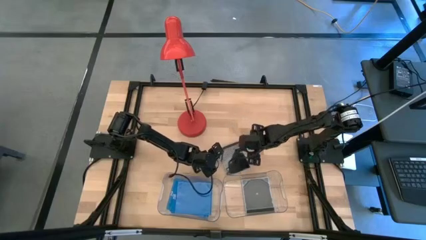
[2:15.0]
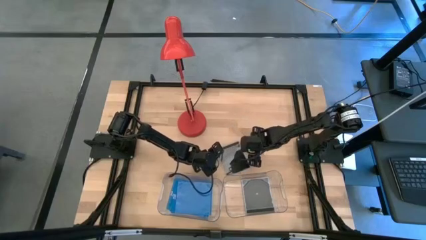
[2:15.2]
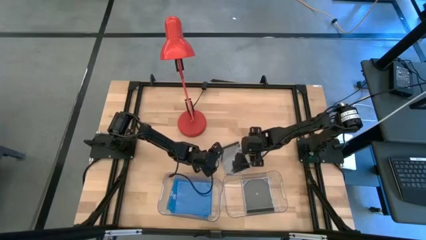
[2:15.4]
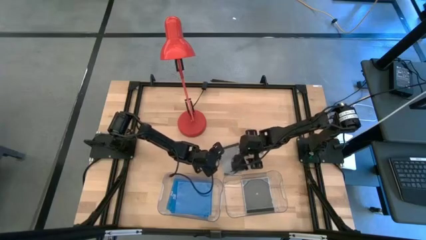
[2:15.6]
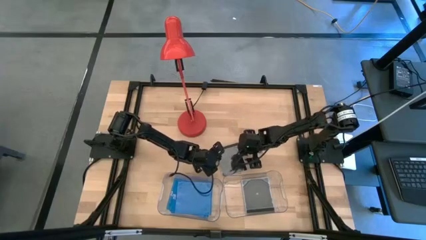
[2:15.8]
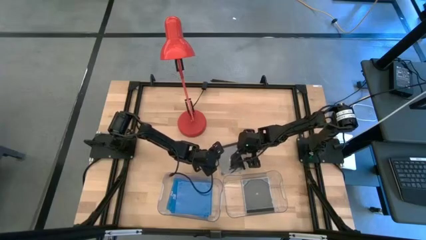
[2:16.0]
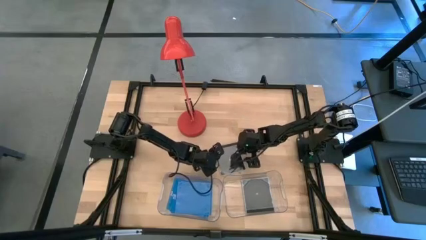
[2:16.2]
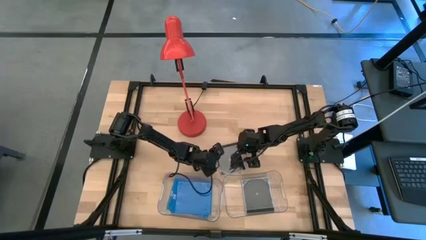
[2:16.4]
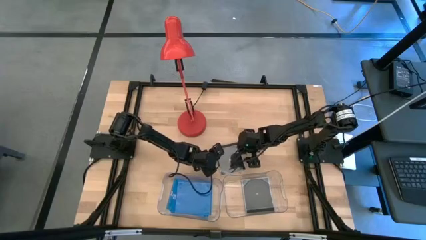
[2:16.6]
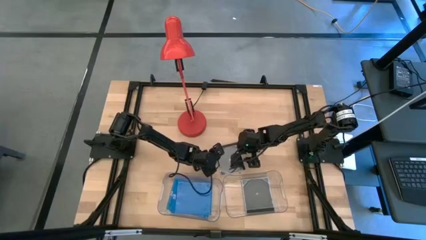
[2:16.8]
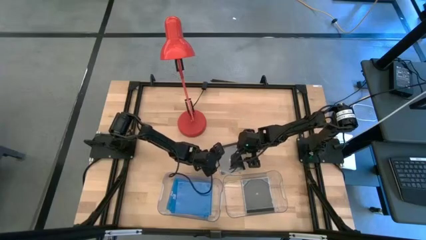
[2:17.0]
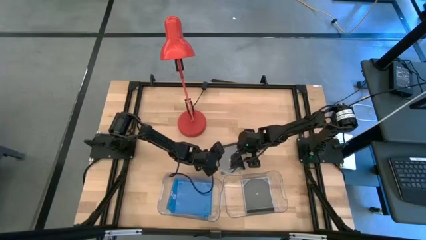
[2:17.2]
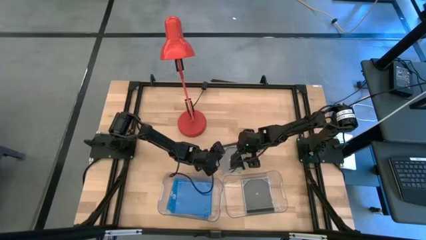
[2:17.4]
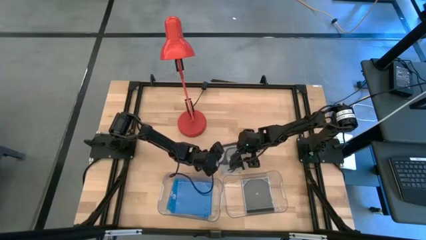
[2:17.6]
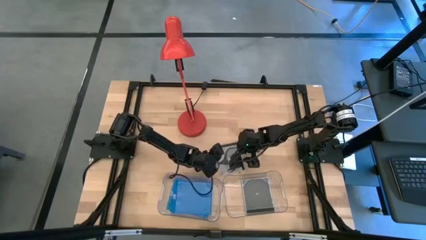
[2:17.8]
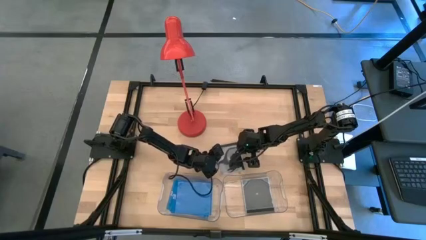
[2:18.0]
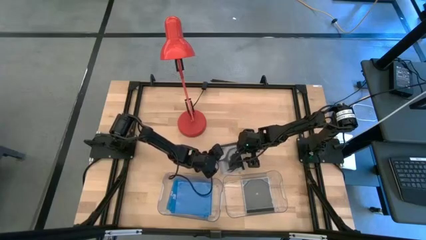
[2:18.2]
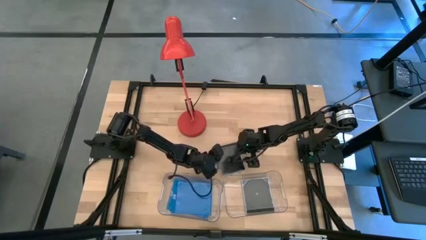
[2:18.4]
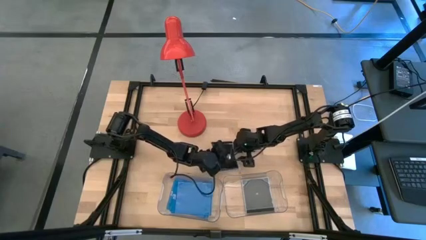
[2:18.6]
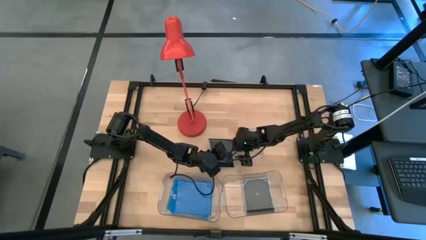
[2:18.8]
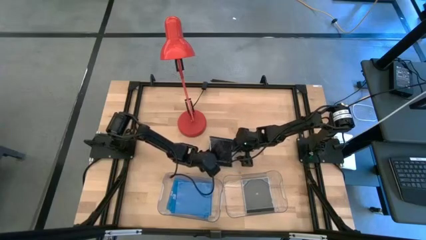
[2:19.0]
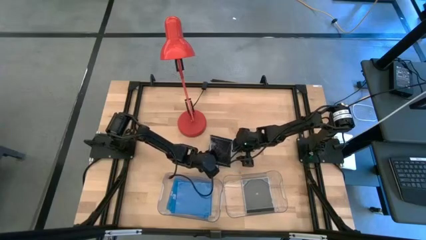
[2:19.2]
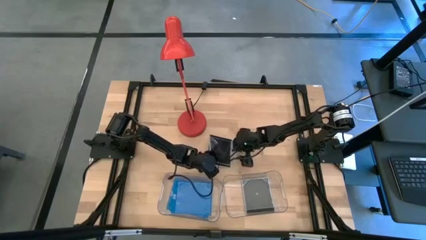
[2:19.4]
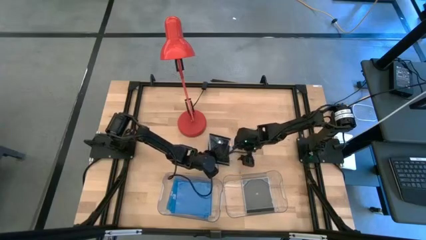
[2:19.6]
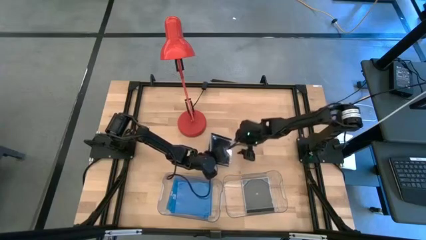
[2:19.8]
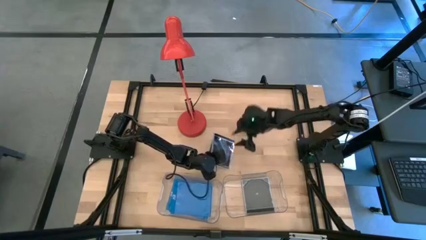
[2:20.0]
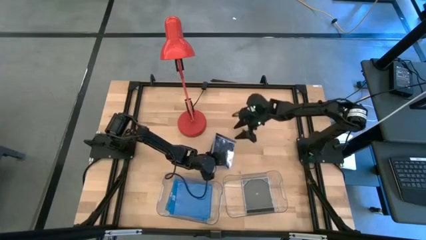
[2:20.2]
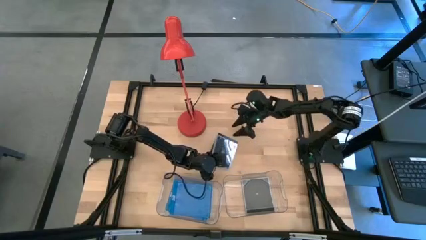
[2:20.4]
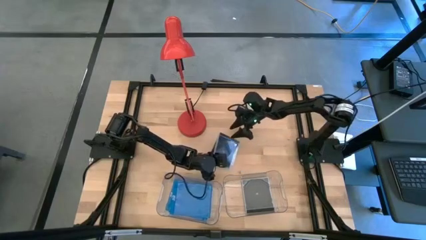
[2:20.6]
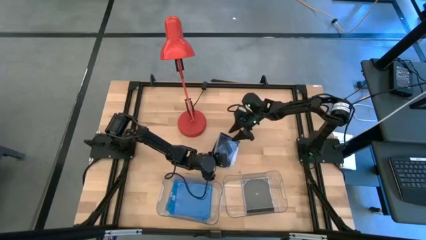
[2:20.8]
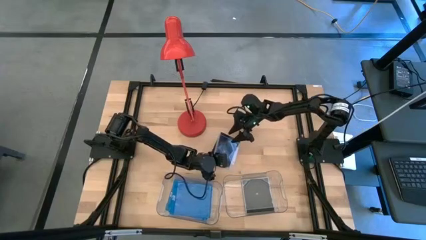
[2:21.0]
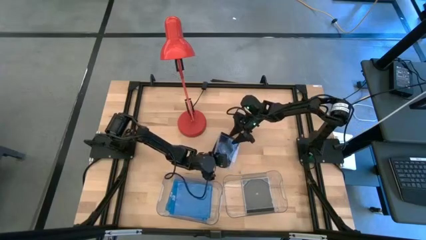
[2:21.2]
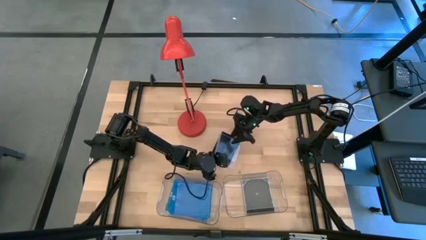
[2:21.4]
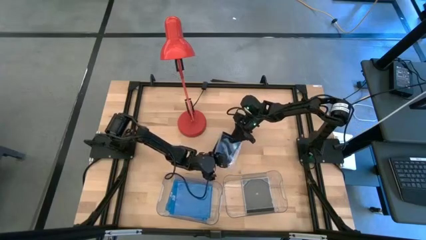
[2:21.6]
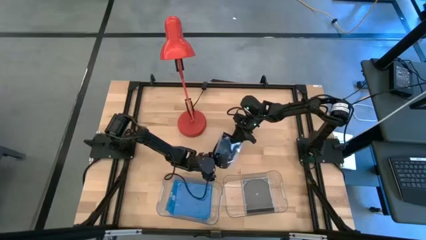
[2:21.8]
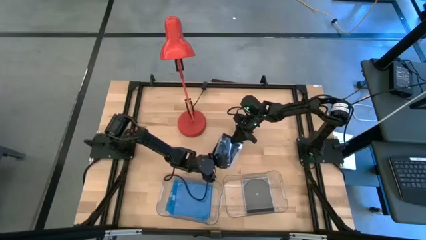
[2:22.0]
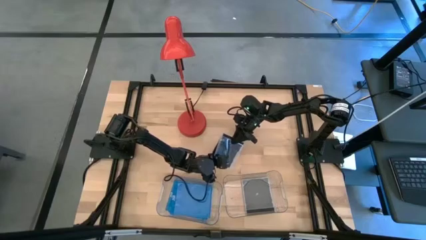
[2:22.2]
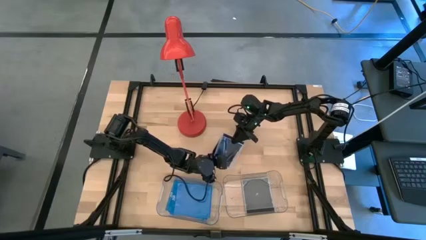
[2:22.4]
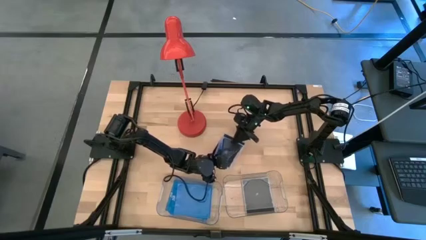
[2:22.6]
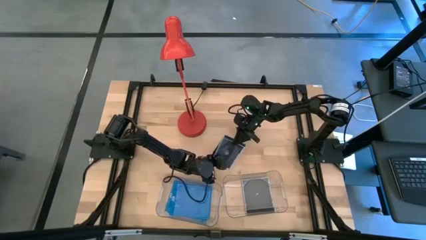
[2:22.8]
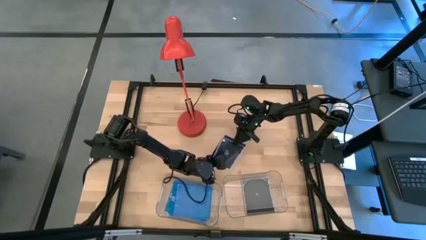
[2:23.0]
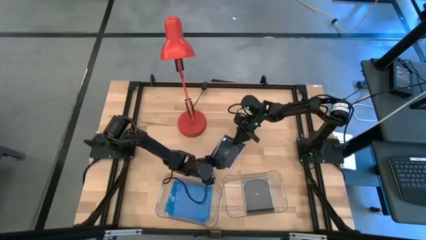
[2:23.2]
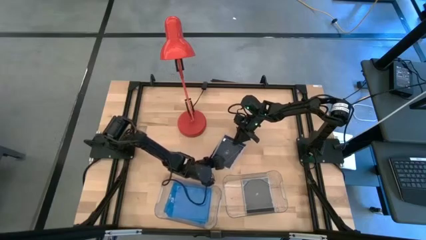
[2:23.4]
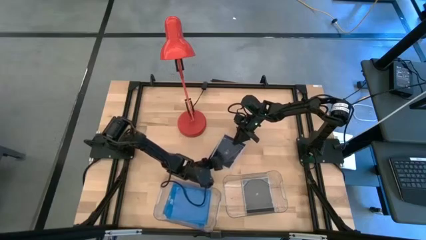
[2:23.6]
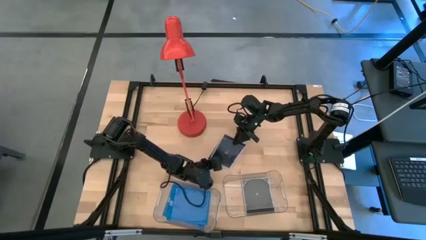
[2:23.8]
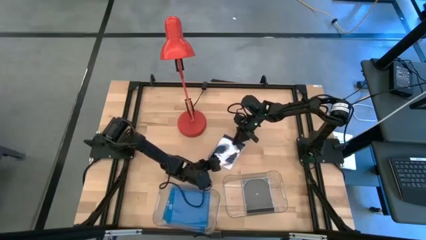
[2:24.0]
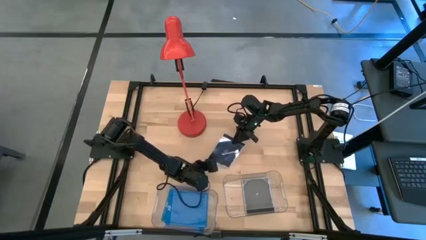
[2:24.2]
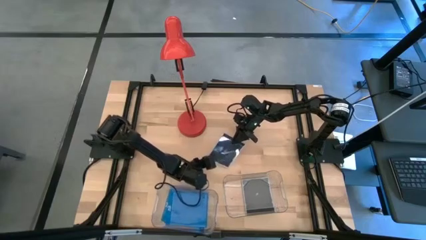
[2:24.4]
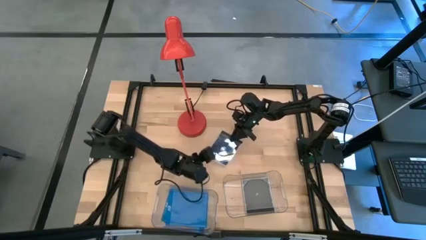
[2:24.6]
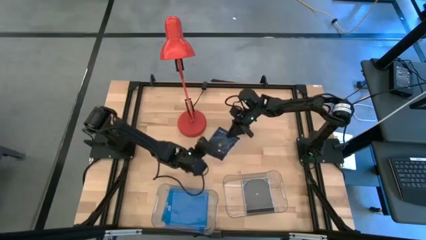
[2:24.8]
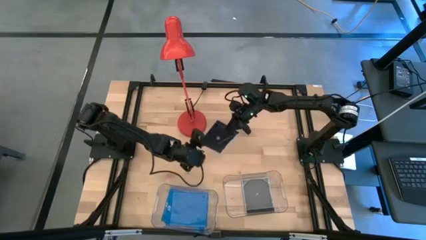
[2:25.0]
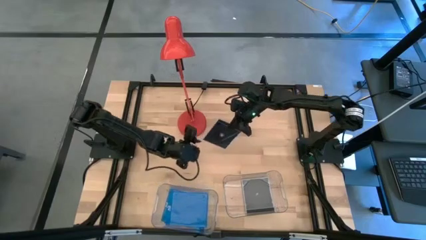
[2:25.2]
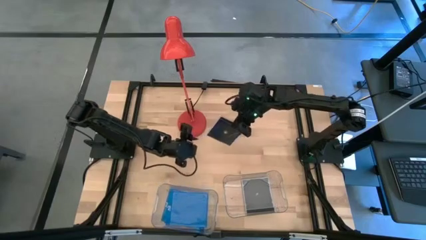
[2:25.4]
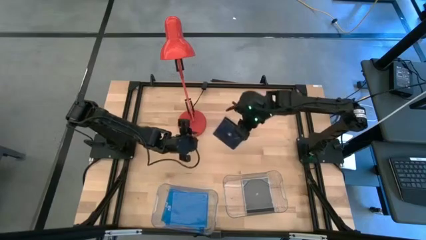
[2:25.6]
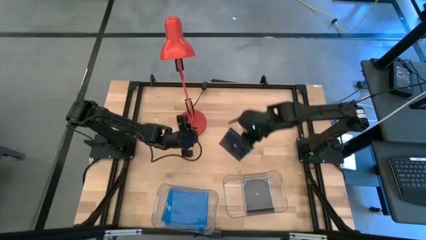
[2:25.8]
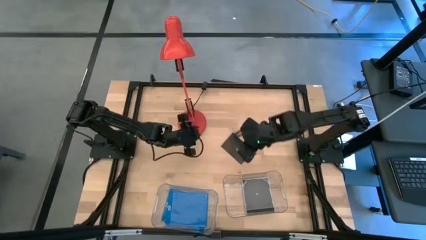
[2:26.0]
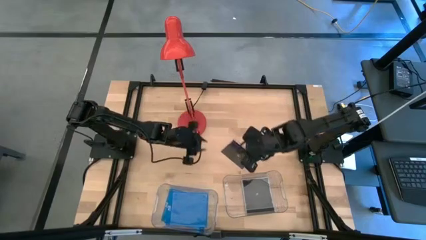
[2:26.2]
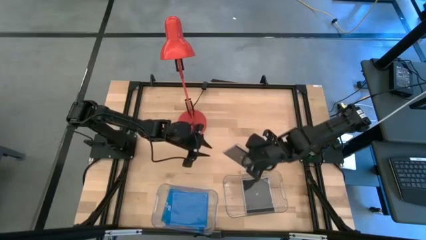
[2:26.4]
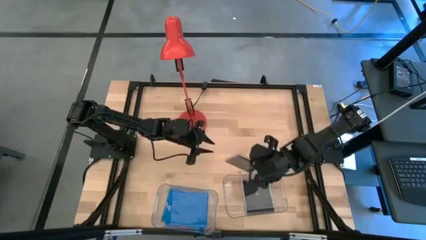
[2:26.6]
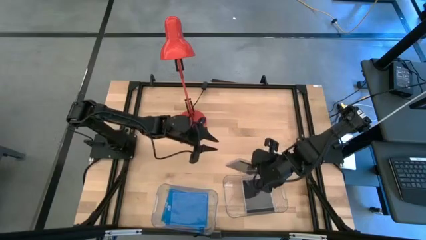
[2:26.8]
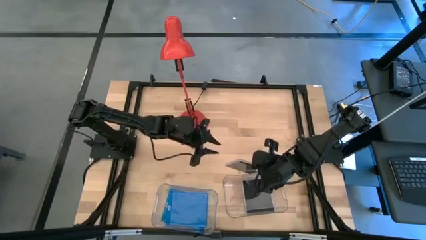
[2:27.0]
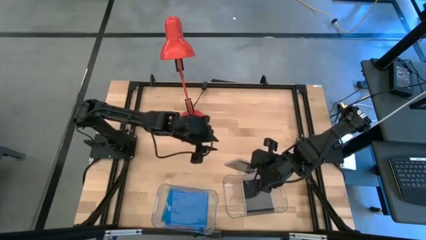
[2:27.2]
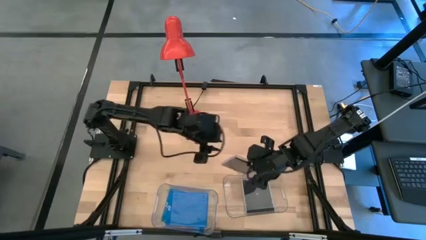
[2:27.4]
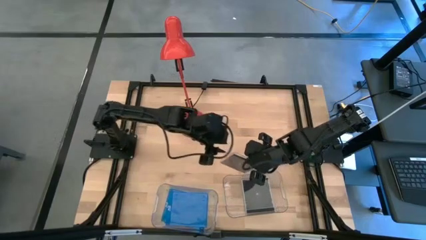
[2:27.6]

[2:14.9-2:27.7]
Task: Pick & place jewel cases by type
Put the black cd case into the right transparent bin
